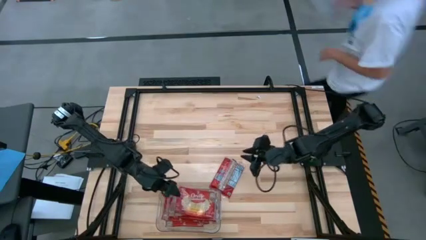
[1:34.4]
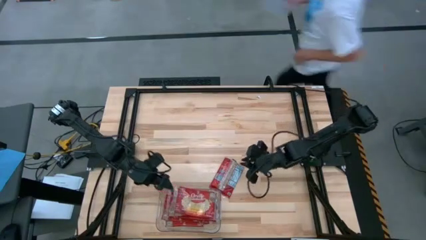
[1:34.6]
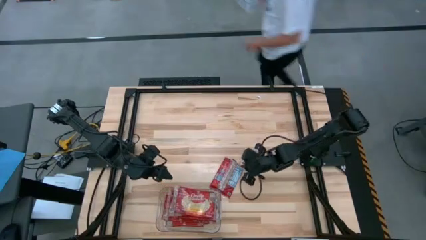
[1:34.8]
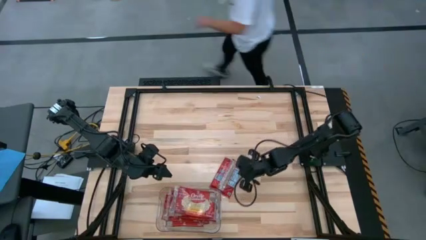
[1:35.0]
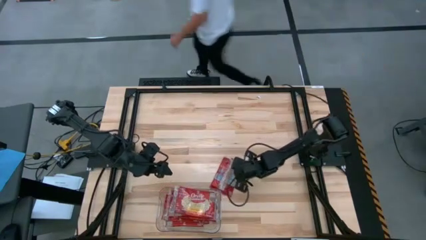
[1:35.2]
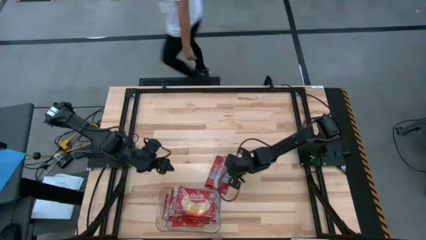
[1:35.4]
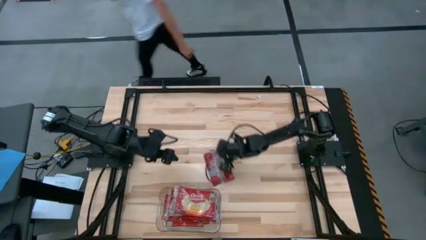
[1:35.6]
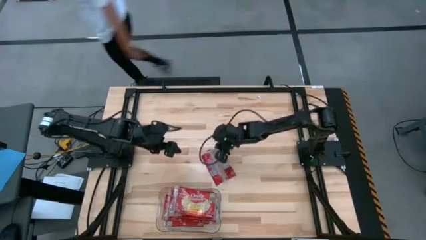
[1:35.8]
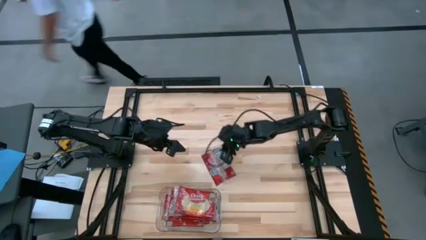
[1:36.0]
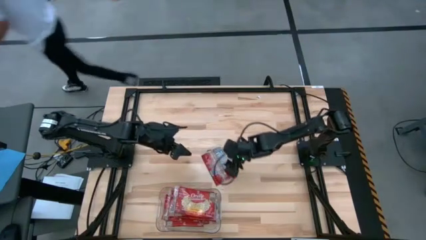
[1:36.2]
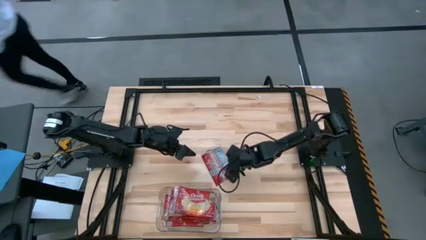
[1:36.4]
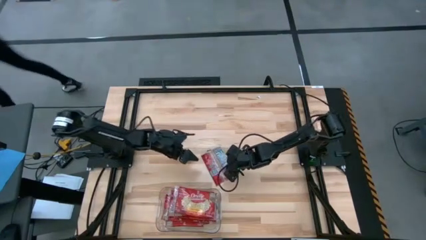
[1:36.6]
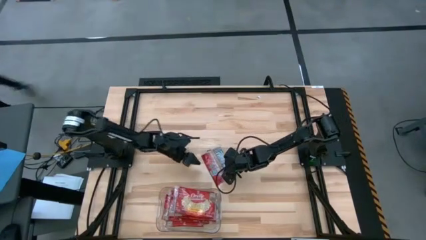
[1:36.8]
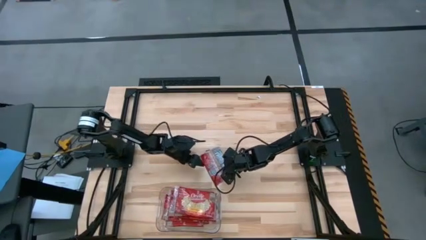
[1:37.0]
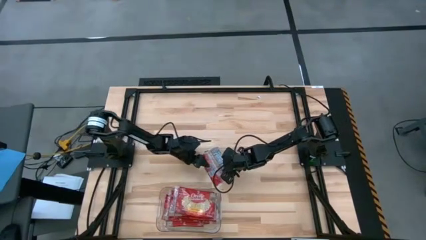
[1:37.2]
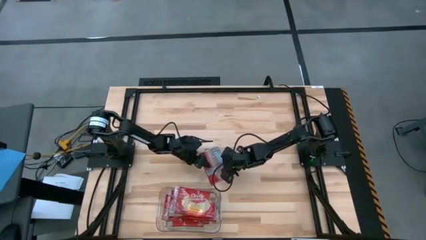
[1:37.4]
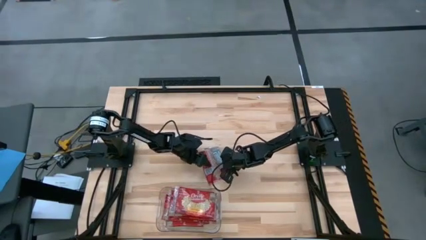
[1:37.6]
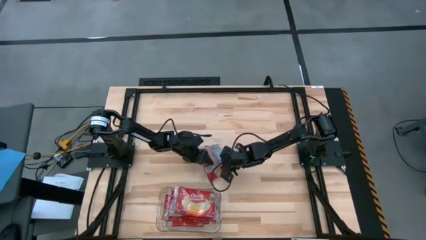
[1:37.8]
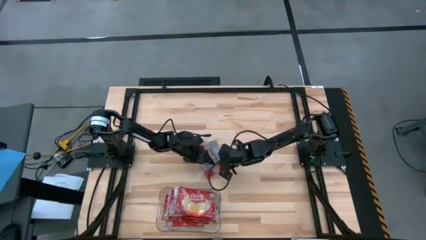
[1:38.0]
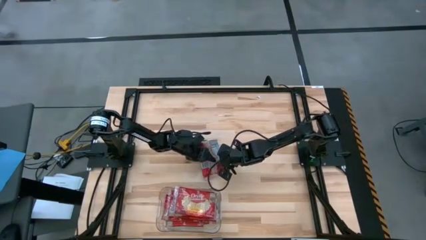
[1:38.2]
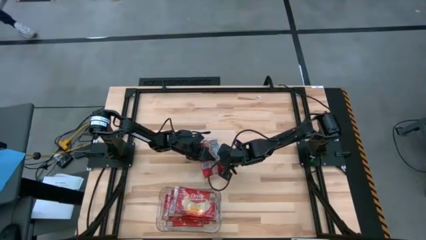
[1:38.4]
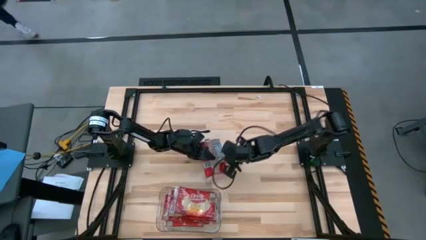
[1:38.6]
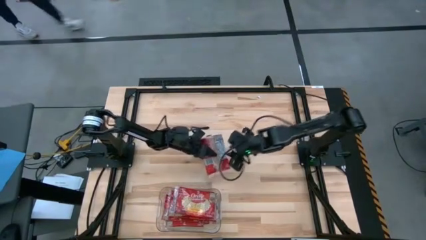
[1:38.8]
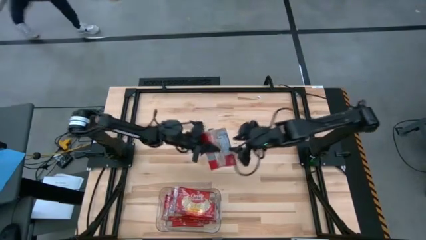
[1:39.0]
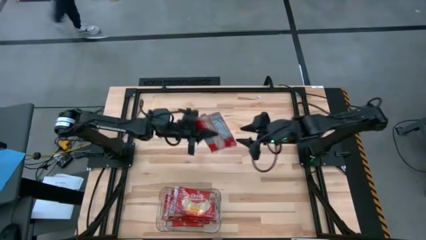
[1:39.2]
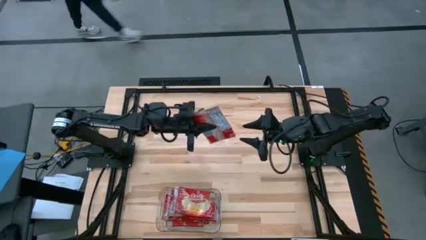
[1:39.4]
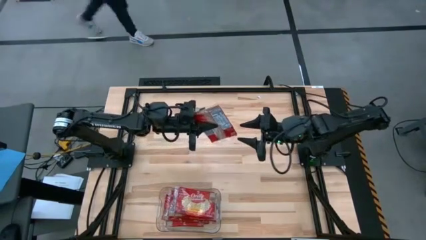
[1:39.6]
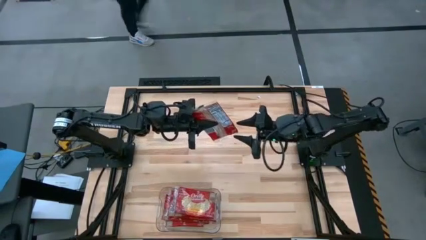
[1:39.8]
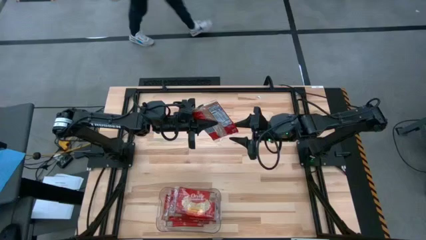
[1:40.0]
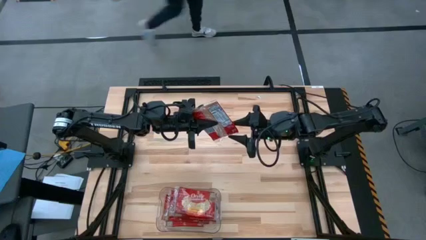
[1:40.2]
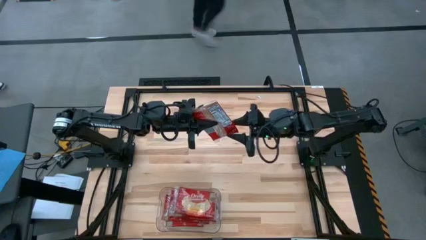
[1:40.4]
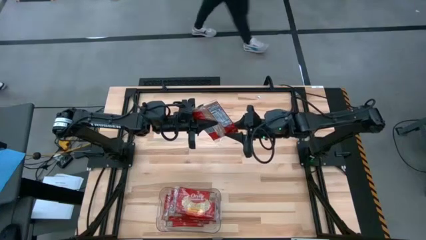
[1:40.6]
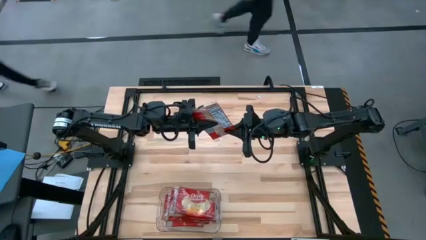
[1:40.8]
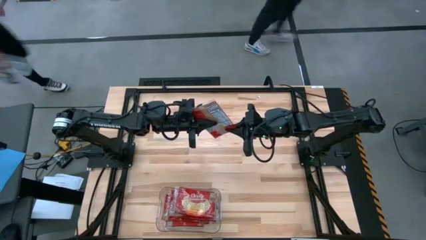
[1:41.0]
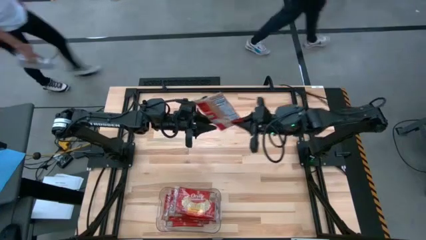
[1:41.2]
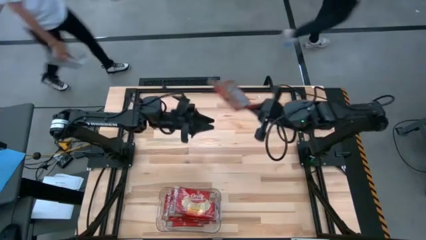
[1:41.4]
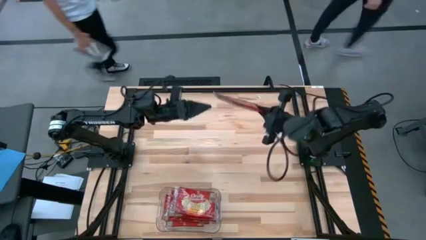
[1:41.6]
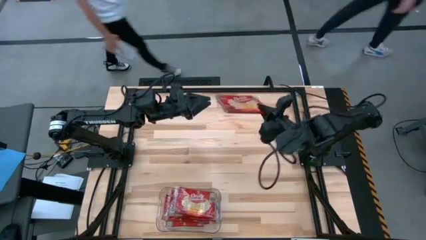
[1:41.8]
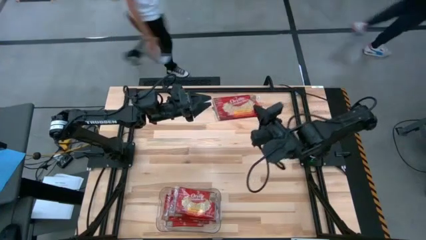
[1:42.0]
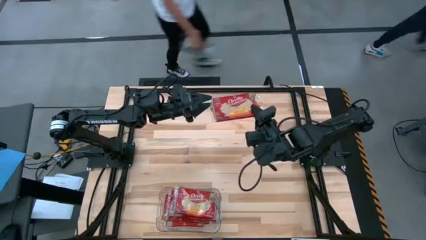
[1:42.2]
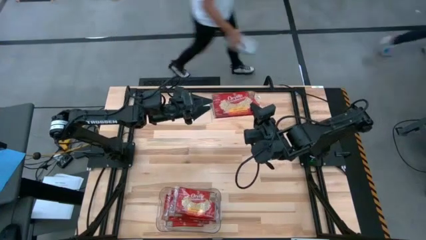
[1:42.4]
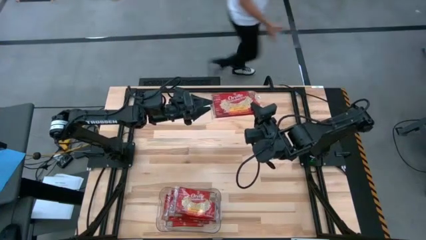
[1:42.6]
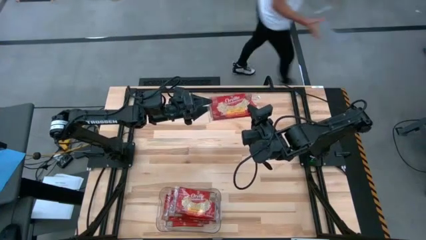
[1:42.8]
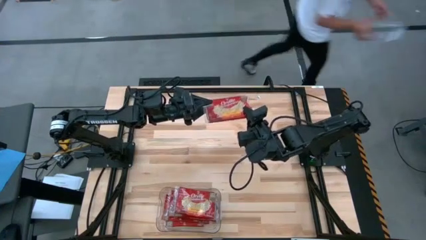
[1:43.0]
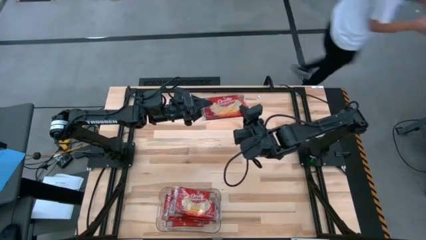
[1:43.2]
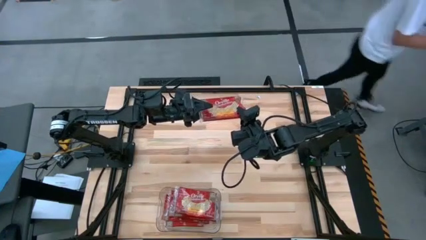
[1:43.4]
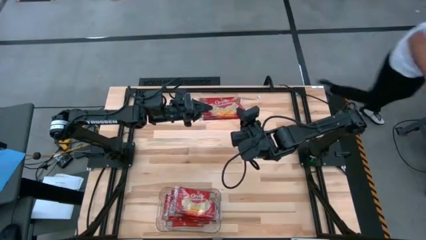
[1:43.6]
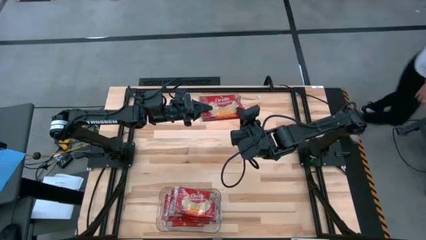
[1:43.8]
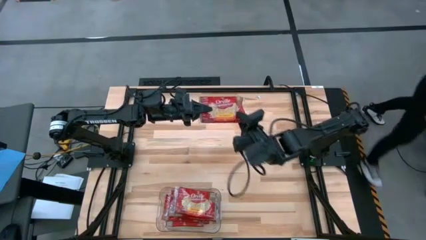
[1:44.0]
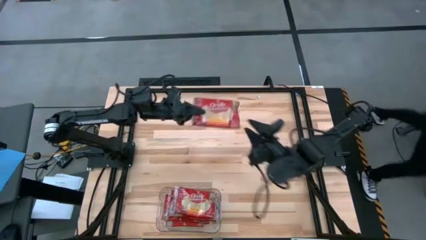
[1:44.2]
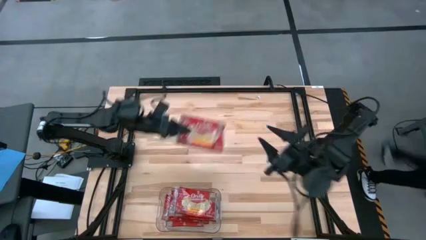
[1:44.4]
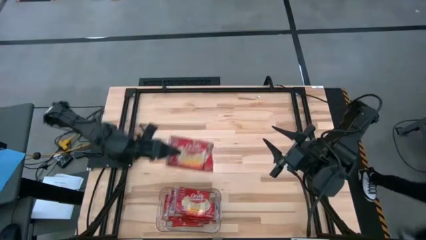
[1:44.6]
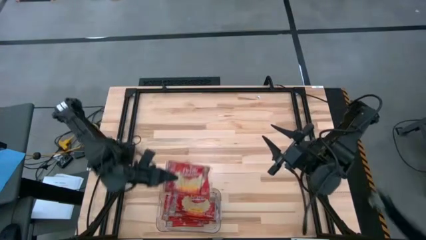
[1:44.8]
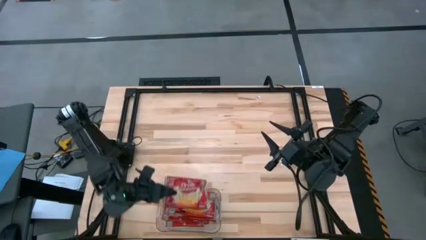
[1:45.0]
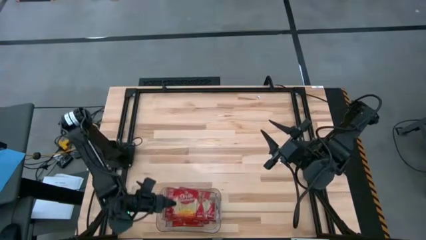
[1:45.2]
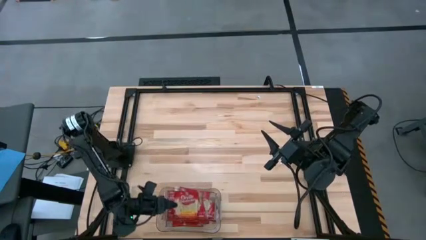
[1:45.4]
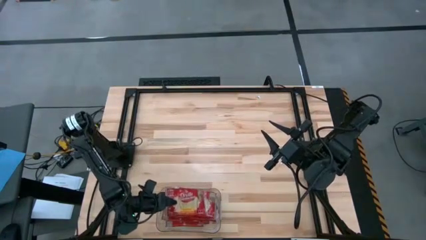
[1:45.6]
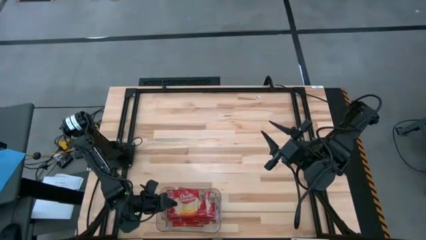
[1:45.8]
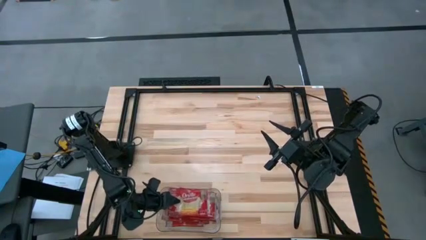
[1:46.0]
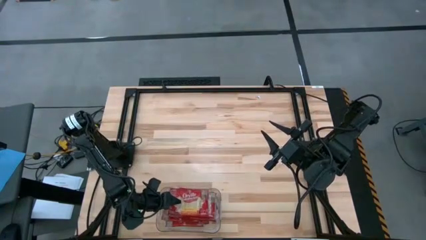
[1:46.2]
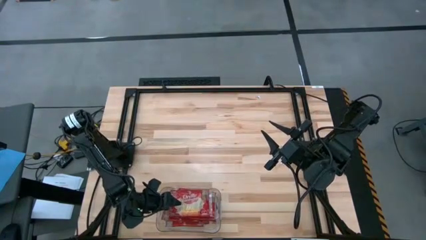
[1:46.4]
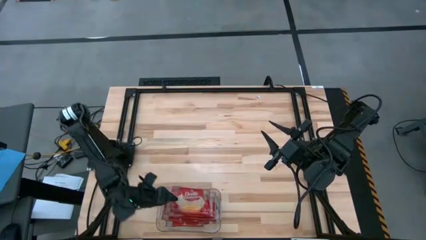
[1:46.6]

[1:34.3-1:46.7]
Task: Sort popcorn bags into baskets
Put the red popcorn bag into the transparent bin

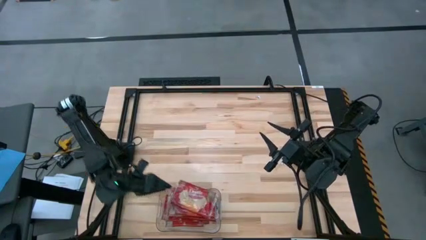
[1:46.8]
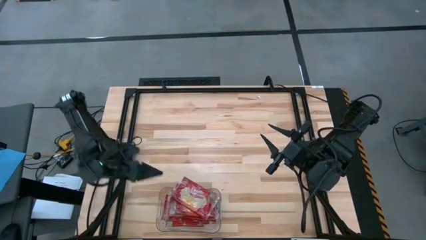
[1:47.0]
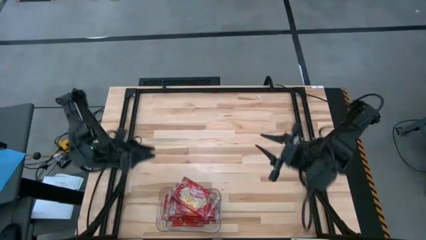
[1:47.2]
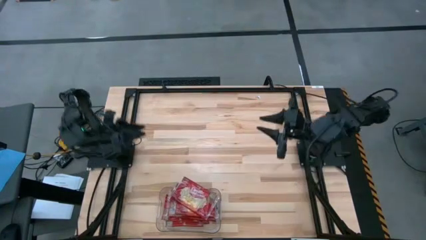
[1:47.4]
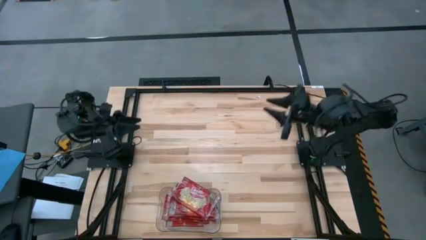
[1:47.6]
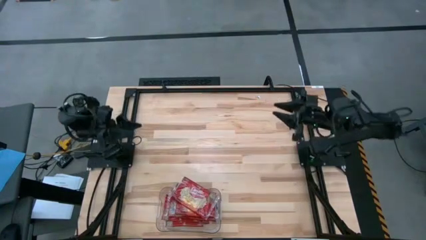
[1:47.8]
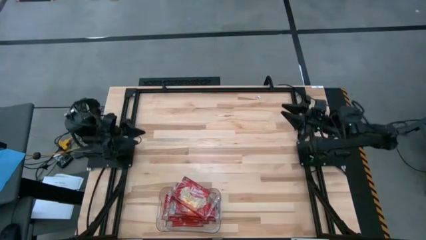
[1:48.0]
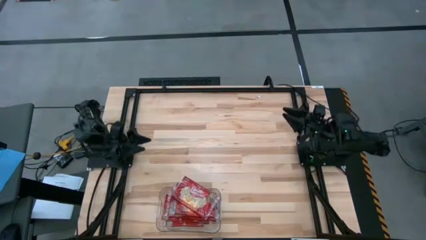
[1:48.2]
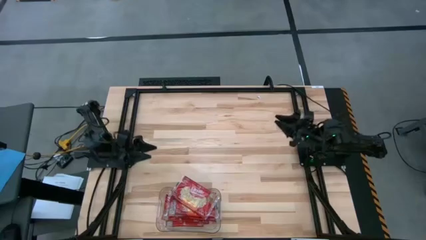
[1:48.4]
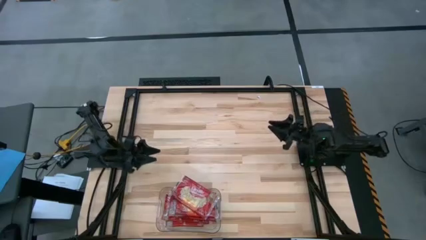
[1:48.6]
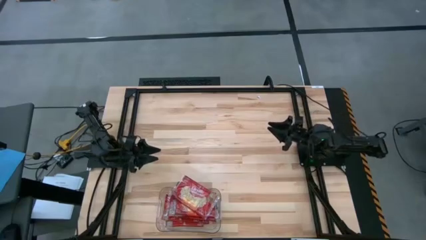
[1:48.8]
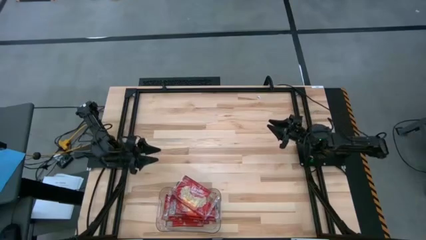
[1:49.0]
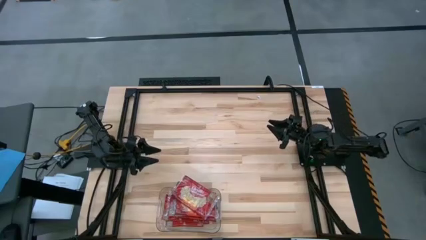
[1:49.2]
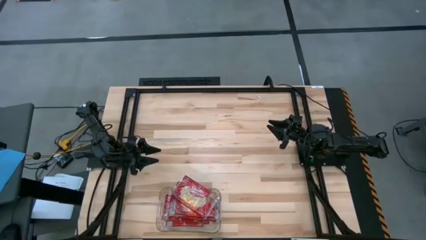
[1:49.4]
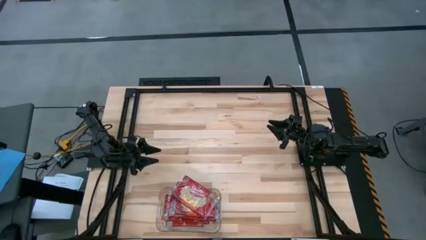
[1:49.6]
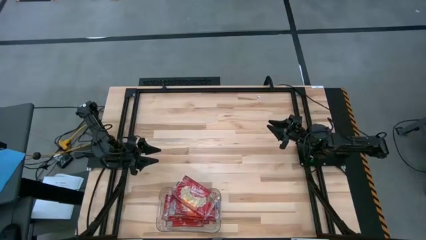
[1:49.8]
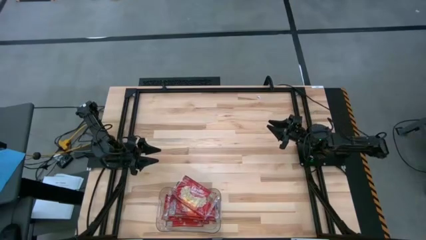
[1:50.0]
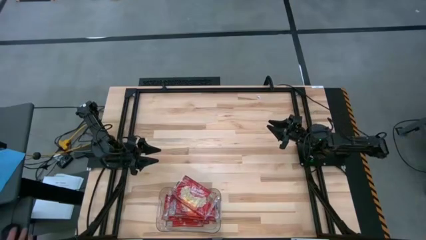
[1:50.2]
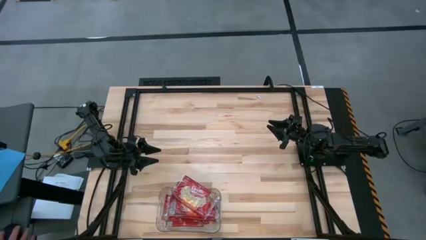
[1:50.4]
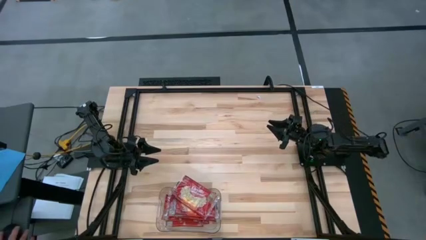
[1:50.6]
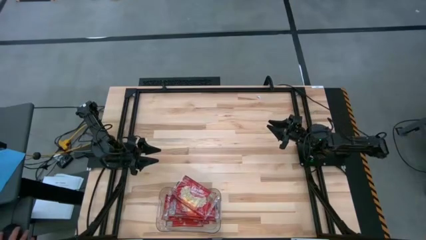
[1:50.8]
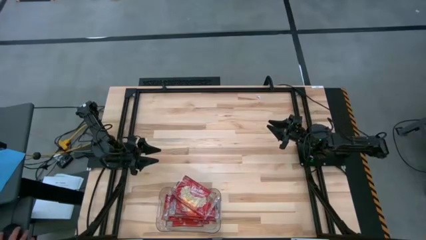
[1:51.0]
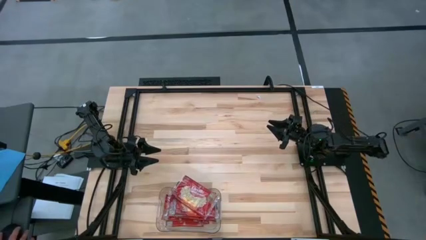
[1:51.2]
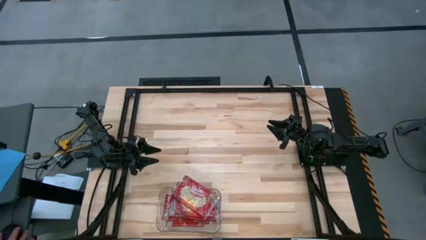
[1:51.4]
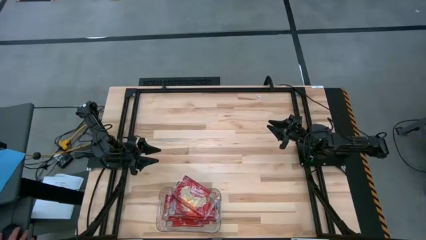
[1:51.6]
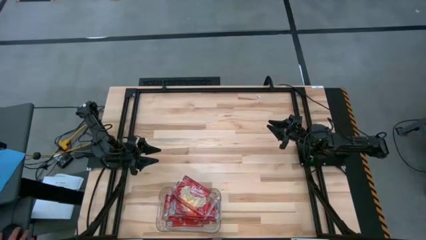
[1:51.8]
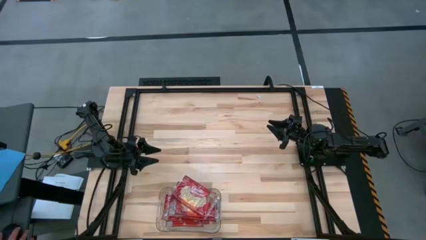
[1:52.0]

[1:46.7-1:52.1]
Return to Home Position
